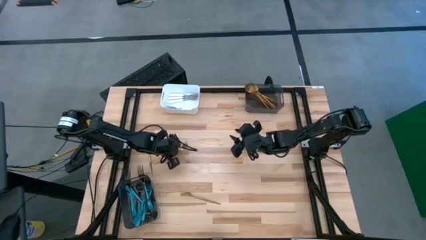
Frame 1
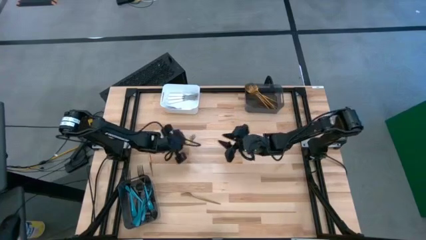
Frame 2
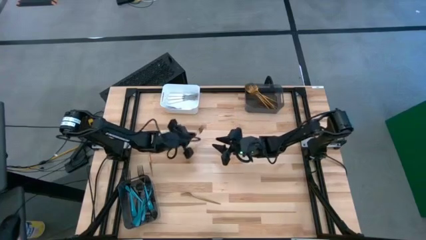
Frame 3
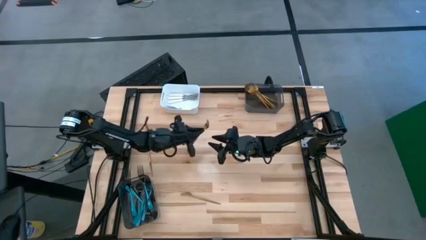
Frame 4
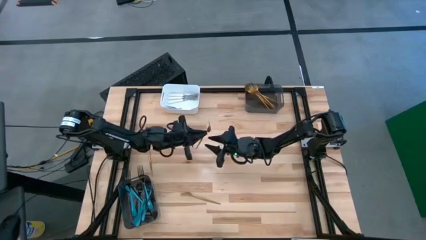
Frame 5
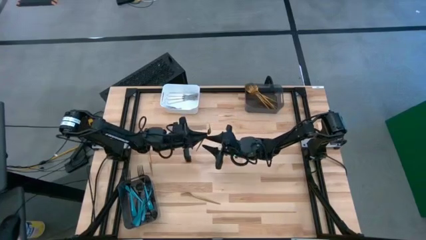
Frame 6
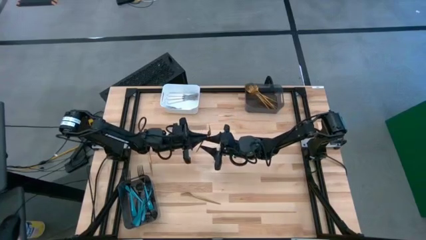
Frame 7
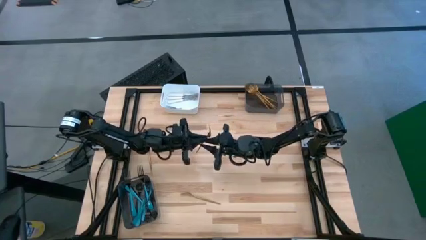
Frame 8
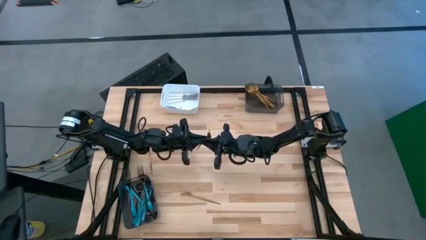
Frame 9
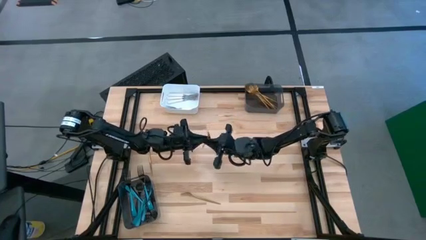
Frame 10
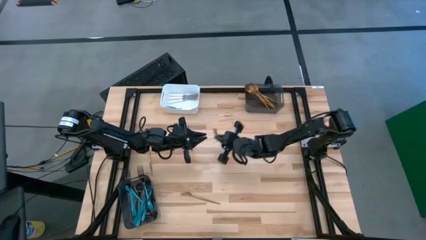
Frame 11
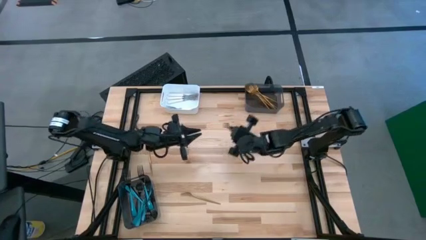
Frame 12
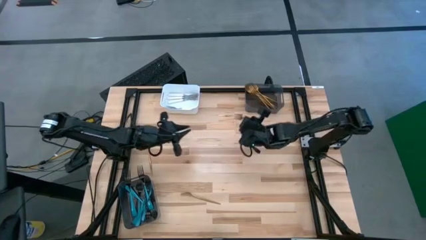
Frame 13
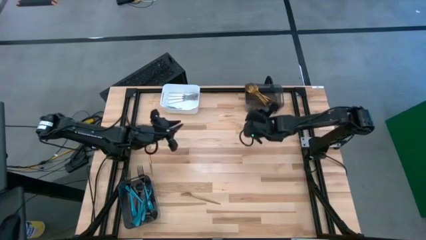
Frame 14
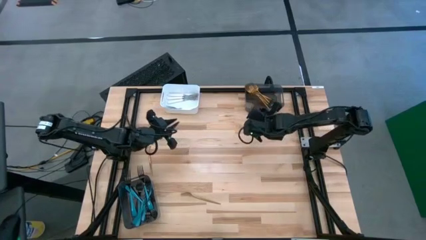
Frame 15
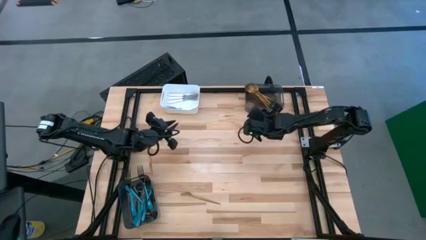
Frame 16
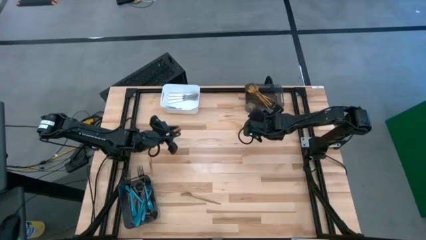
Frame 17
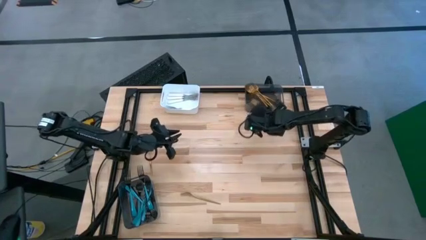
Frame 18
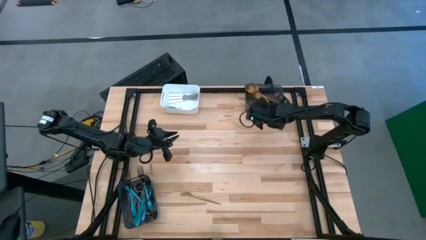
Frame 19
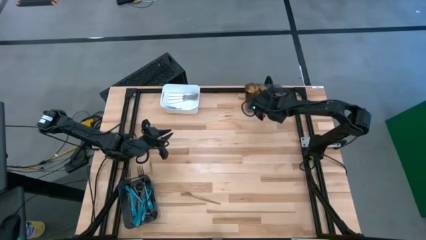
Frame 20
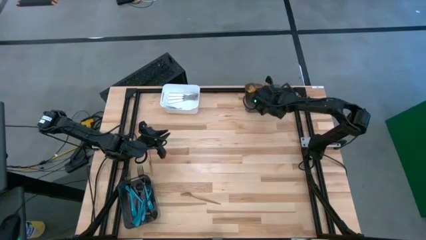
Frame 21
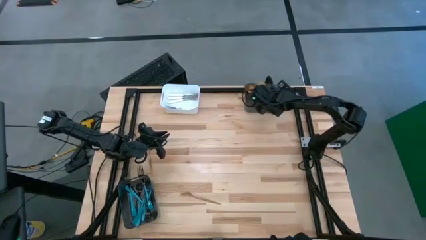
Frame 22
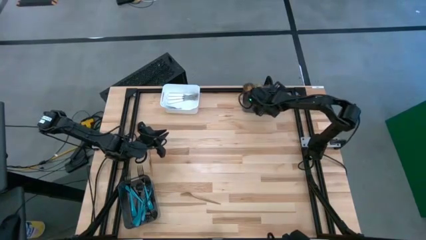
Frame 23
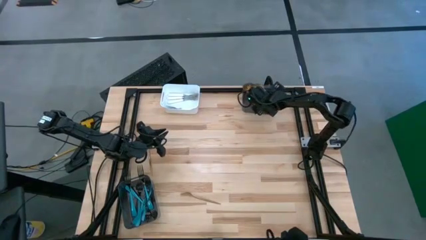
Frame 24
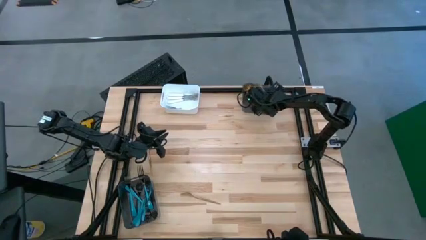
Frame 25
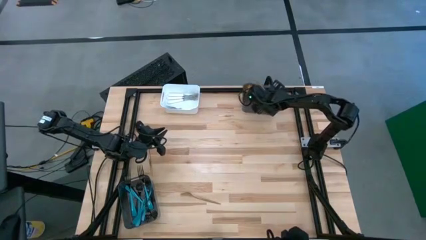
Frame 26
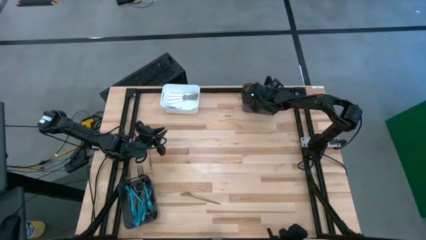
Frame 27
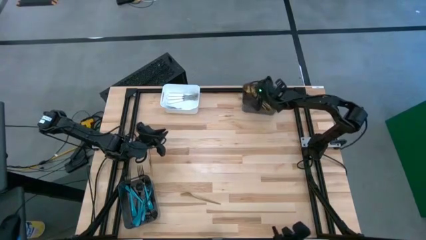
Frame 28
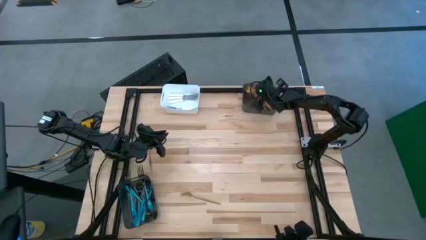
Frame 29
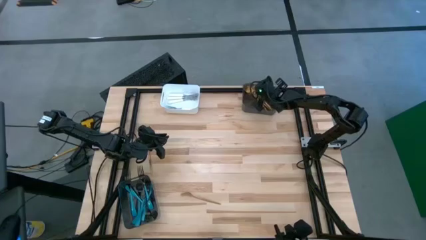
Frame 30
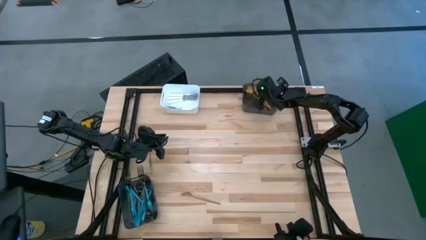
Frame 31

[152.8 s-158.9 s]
Task: Sort silverware by color (type)
Put the gold fork into the top black bin

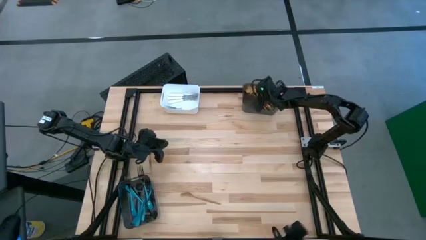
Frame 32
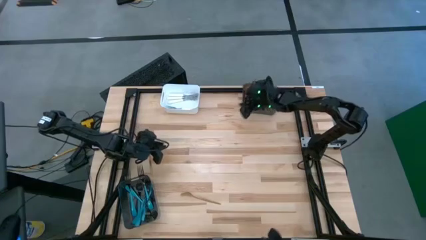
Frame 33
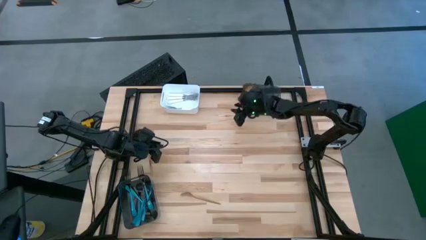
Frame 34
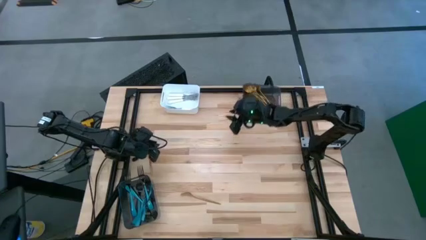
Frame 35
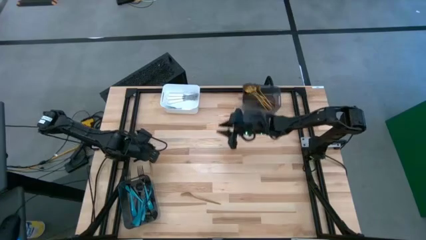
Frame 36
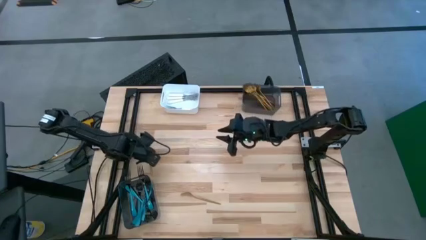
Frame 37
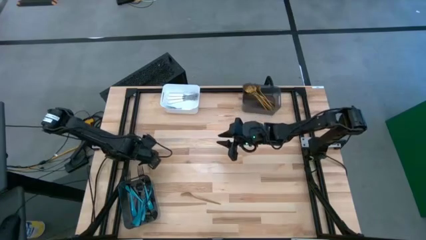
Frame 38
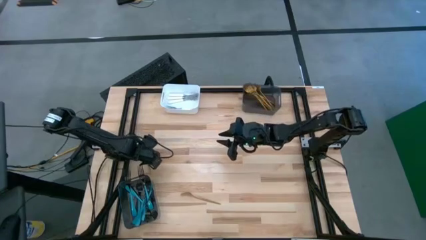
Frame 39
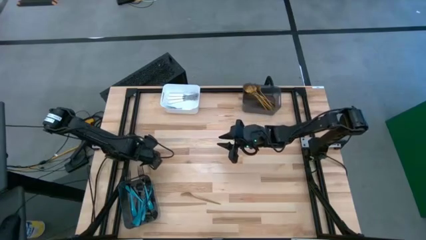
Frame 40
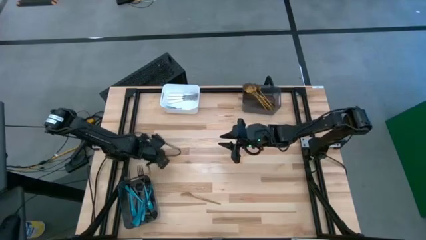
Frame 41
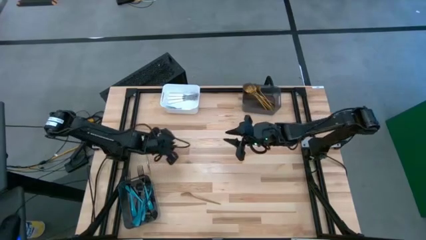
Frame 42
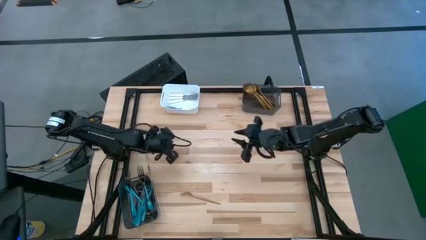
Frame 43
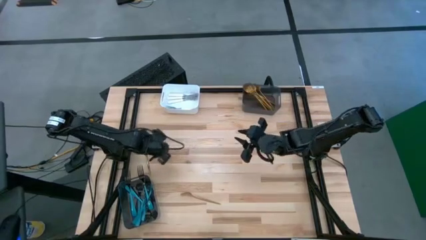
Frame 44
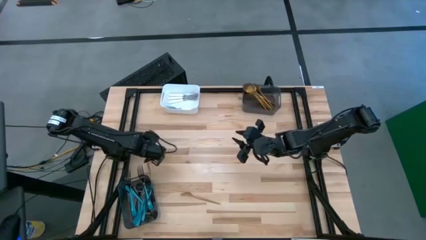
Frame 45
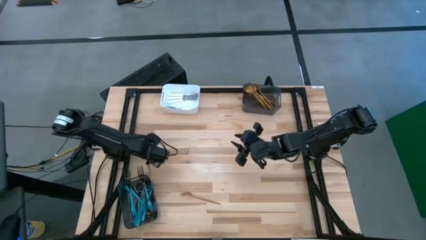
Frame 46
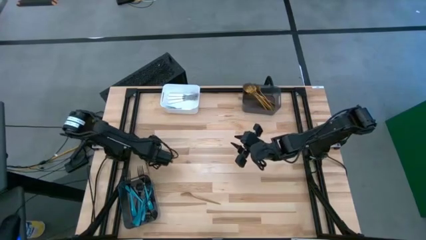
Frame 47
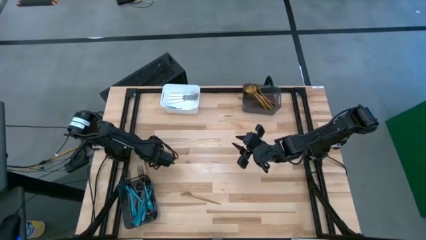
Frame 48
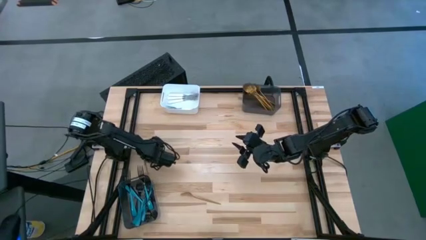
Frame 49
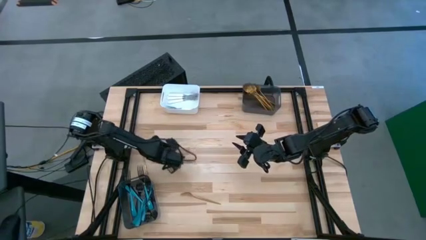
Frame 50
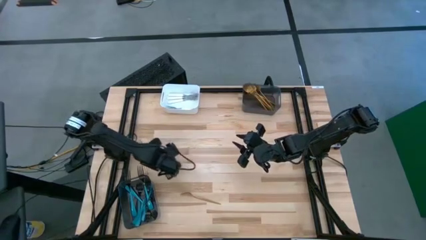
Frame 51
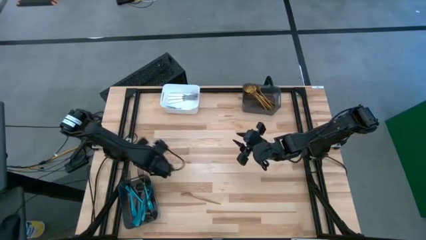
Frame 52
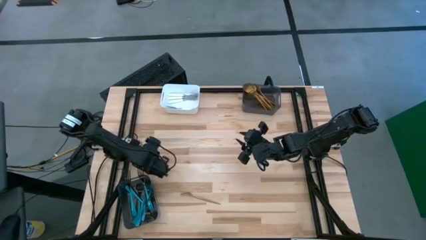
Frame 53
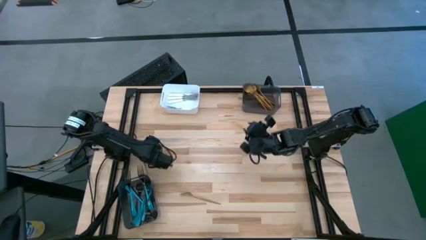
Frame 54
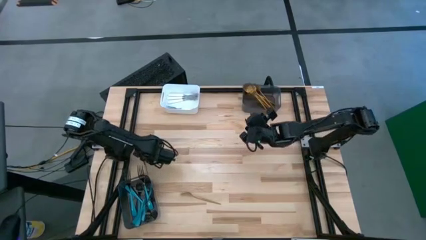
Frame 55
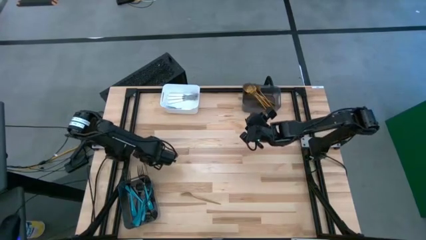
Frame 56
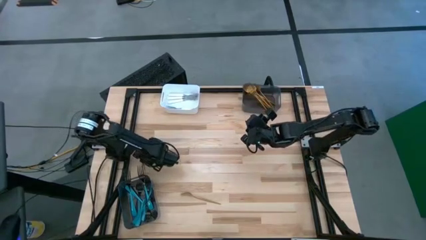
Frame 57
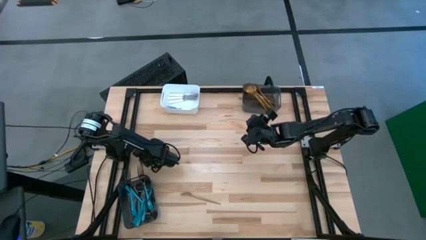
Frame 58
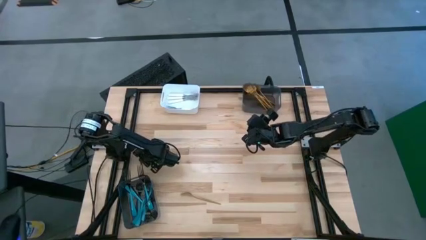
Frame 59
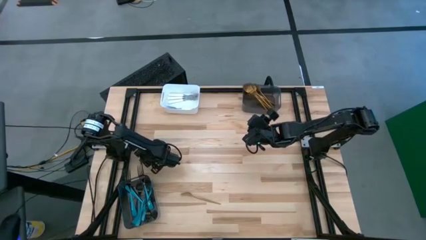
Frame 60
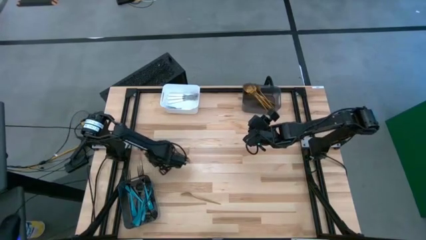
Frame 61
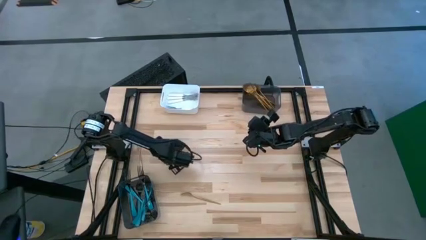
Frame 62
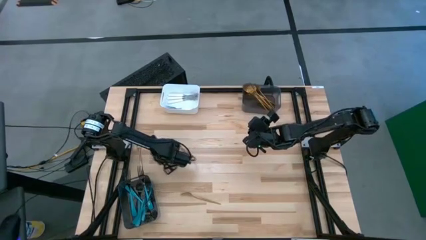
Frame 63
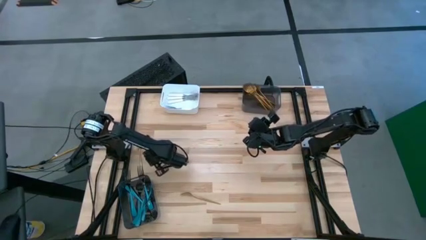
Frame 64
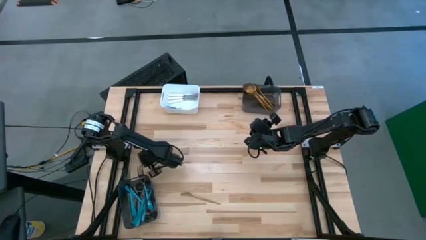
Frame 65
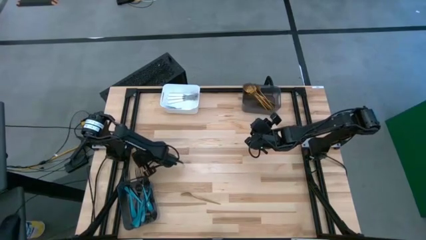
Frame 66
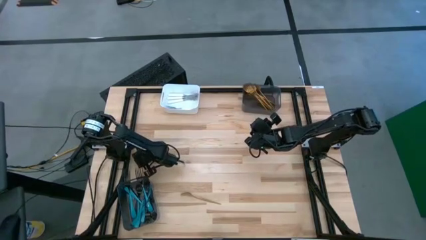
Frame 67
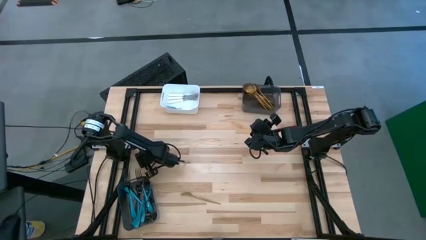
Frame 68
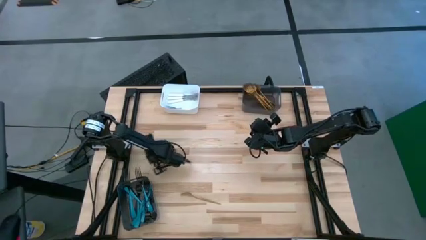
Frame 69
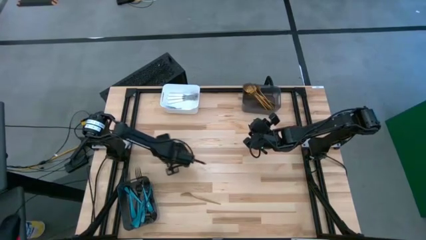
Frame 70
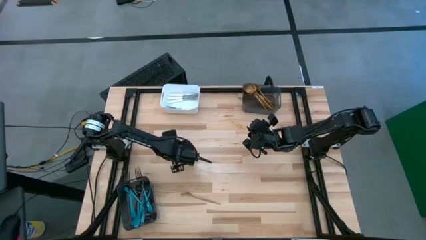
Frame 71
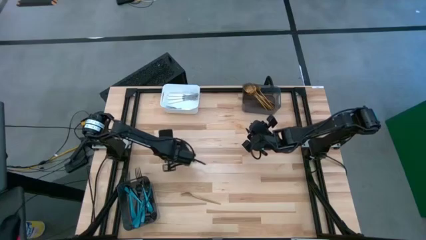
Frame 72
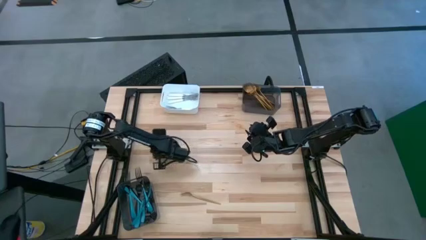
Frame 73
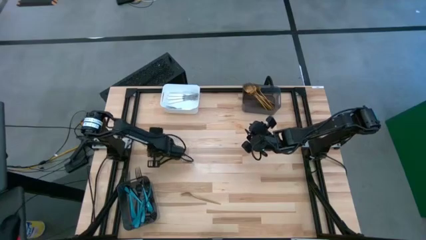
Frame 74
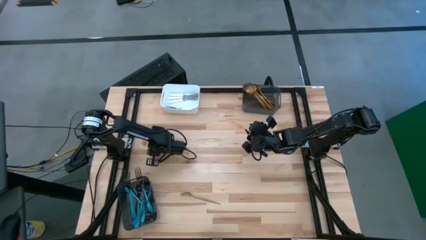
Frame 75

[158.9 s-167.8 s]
Put the gold fork into the top black bin

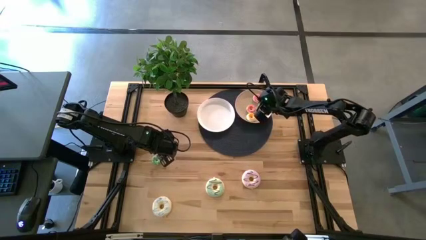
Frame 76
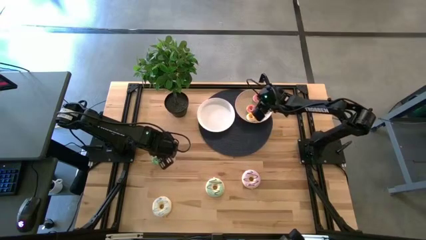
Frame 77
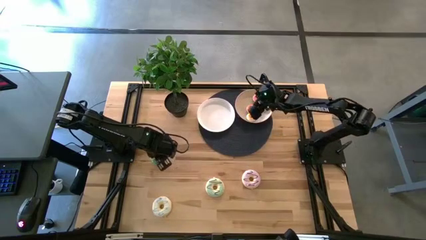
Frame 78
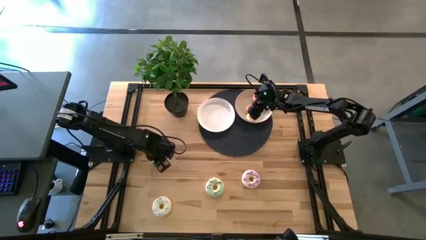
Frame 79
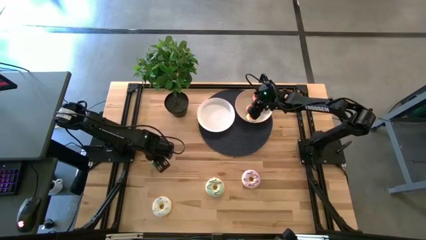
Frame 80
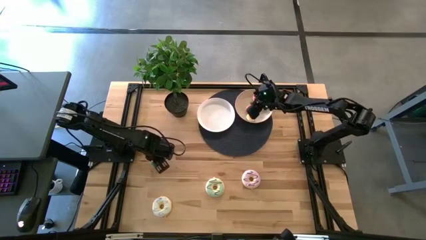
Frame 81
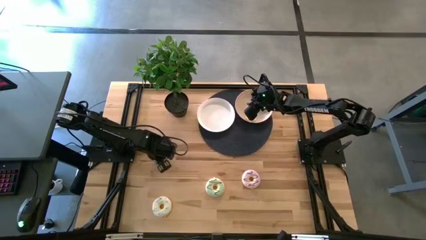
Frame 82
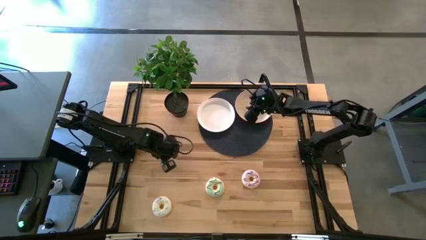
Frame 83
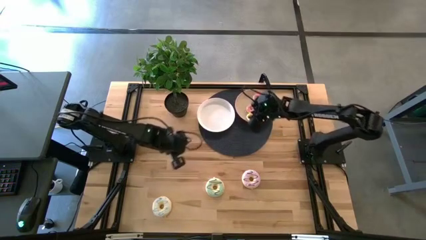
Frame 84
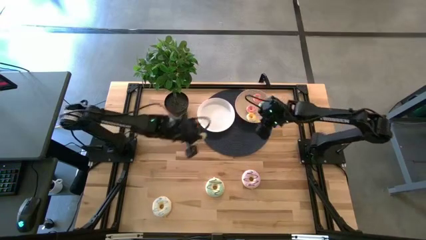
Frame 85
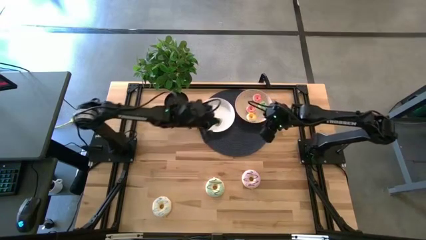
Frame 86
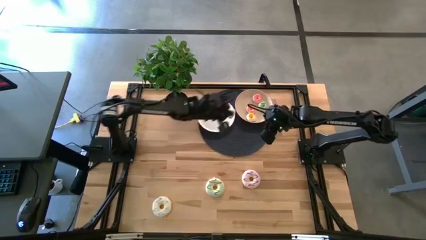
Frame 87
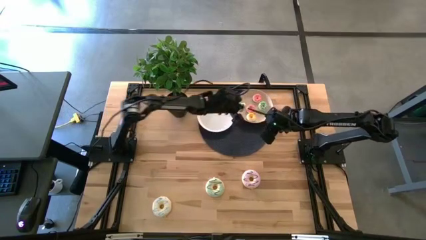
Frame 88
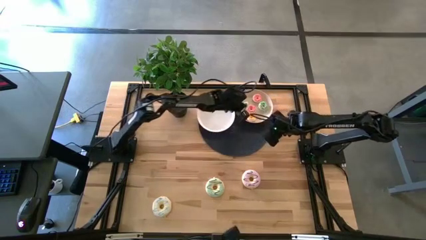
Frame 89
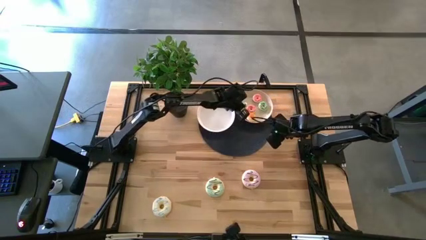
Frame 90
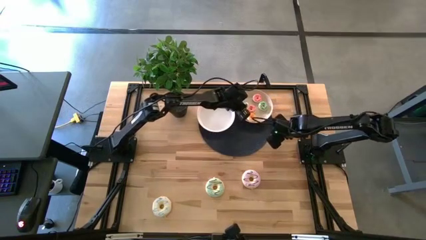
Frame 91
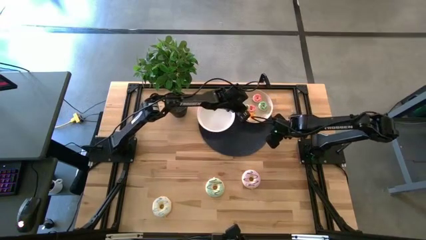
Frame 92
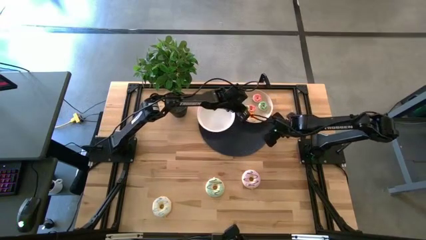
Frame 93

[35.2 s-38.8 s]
Task: Pick & Place donuts
Put the small green donut on the brown plate
